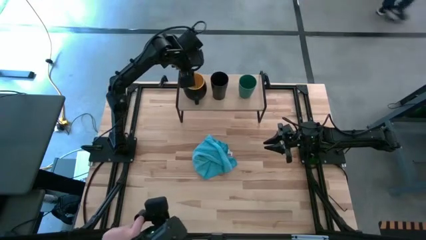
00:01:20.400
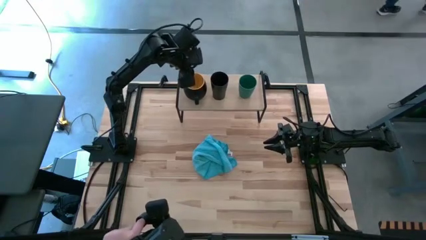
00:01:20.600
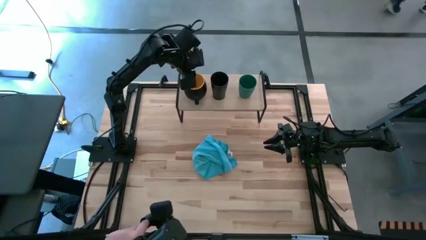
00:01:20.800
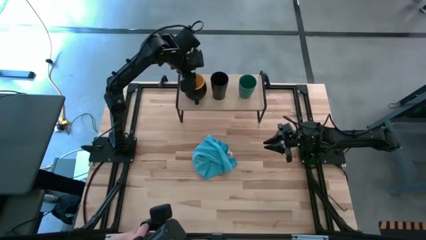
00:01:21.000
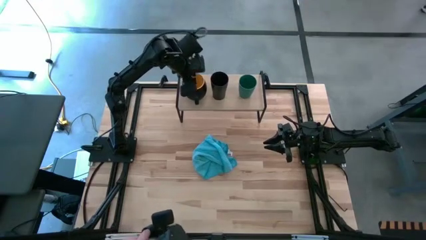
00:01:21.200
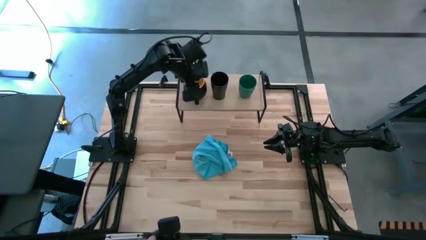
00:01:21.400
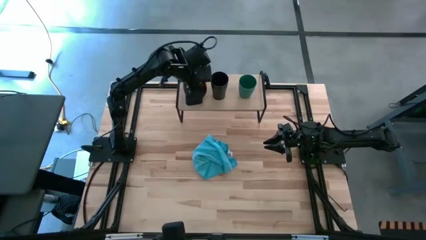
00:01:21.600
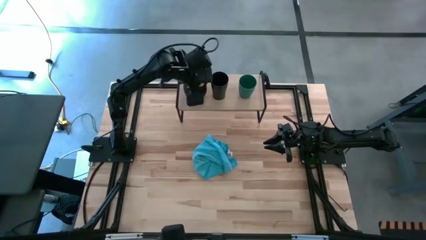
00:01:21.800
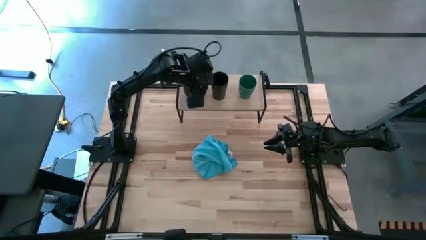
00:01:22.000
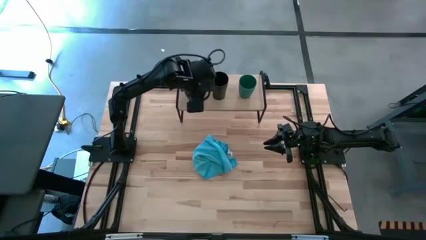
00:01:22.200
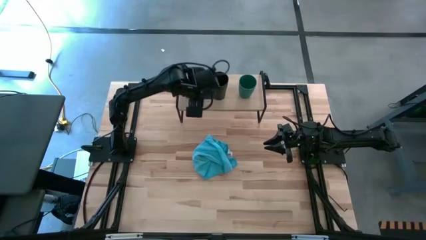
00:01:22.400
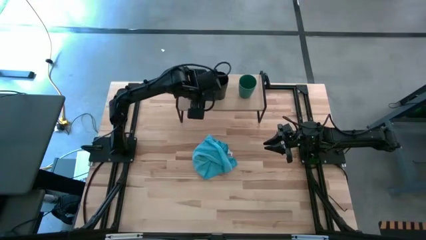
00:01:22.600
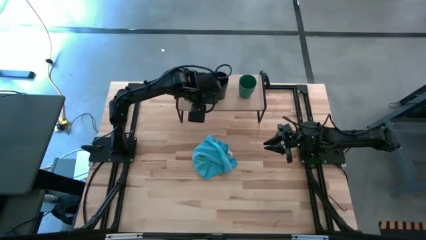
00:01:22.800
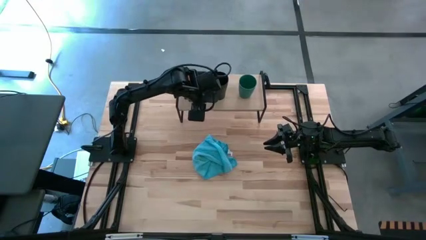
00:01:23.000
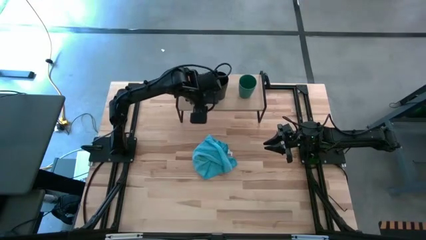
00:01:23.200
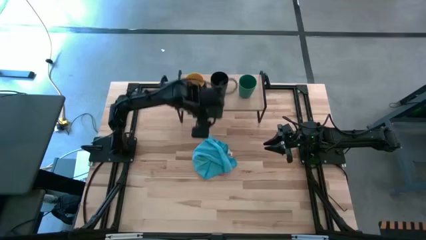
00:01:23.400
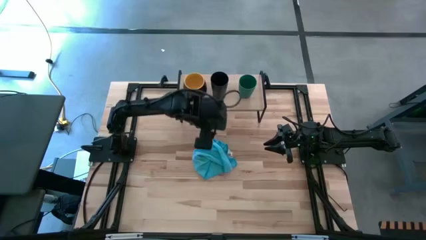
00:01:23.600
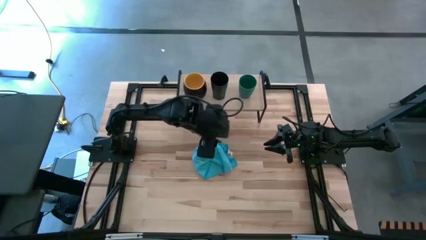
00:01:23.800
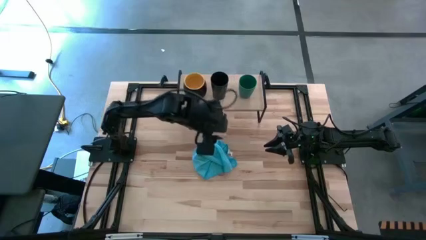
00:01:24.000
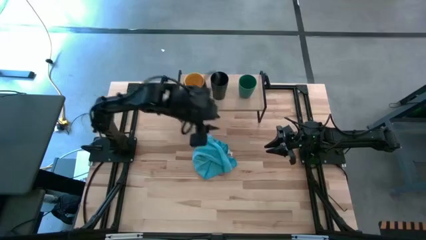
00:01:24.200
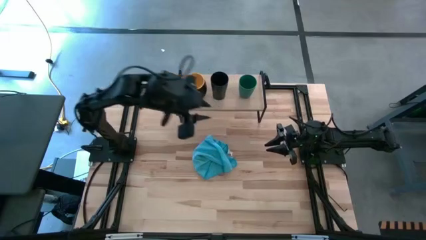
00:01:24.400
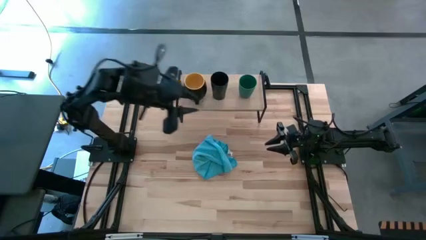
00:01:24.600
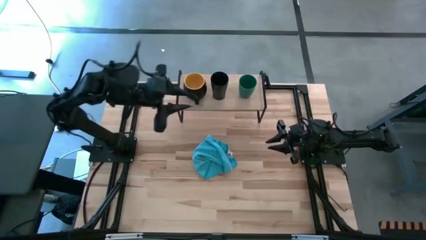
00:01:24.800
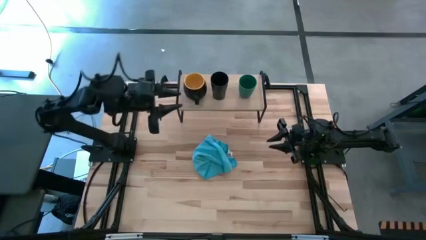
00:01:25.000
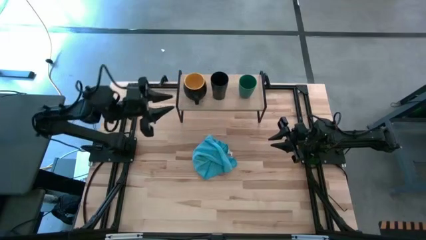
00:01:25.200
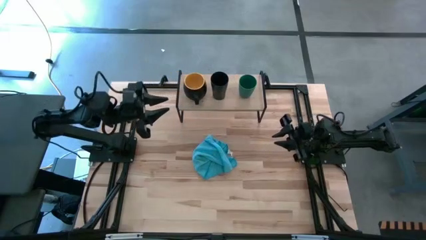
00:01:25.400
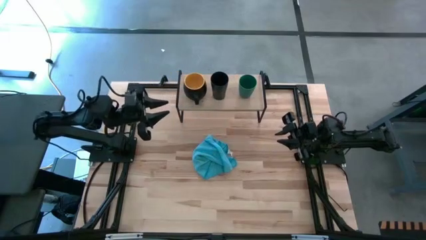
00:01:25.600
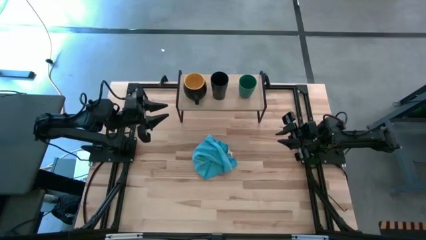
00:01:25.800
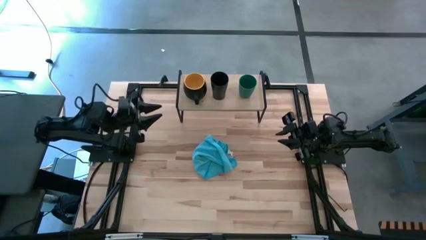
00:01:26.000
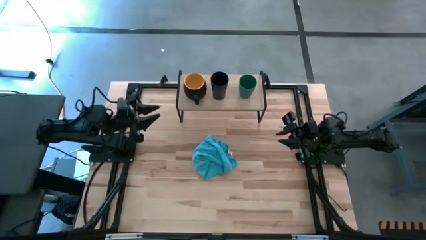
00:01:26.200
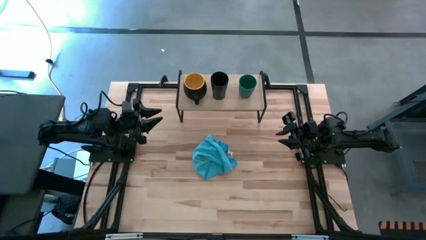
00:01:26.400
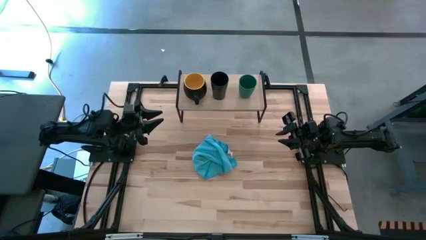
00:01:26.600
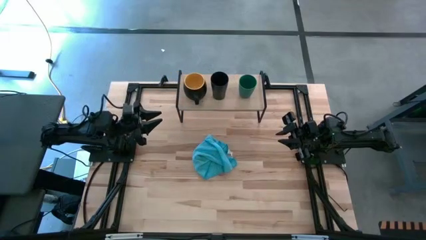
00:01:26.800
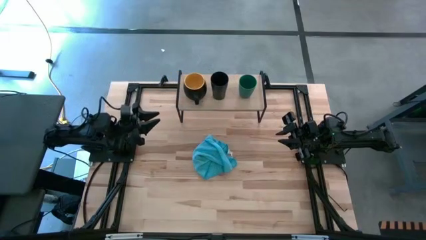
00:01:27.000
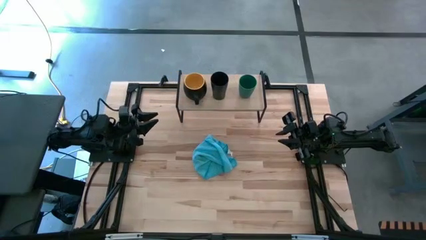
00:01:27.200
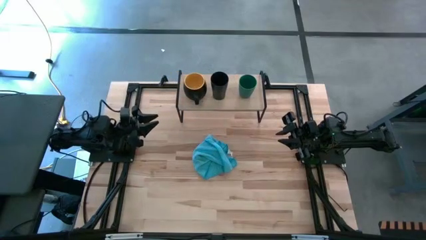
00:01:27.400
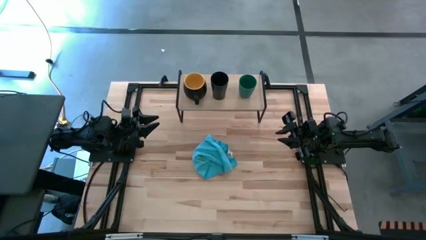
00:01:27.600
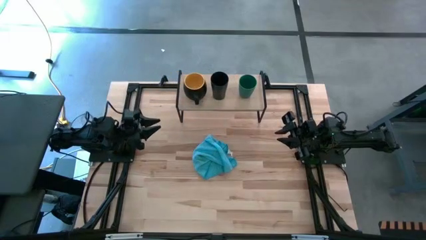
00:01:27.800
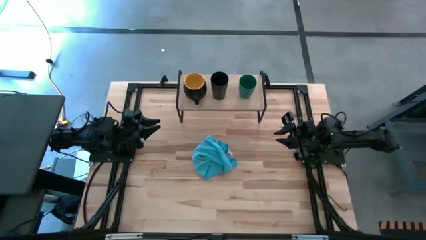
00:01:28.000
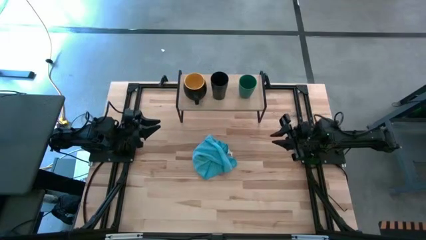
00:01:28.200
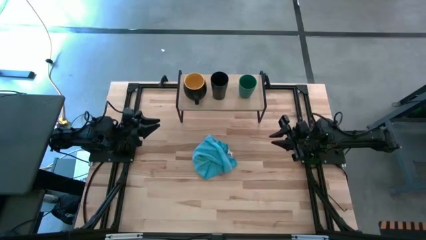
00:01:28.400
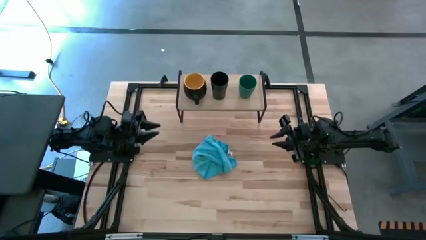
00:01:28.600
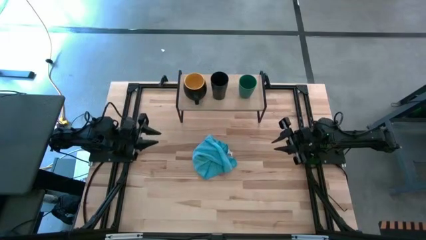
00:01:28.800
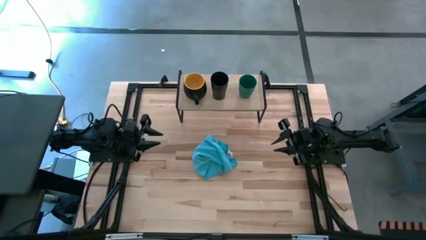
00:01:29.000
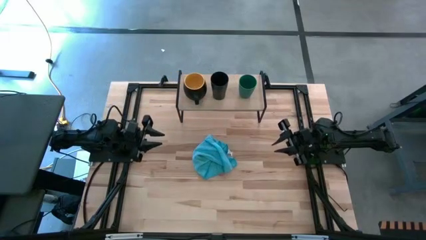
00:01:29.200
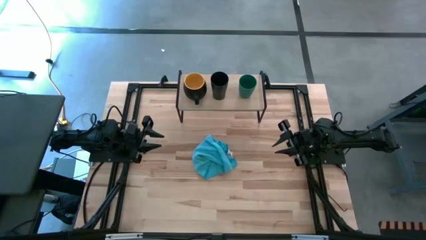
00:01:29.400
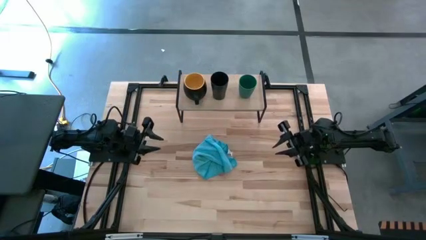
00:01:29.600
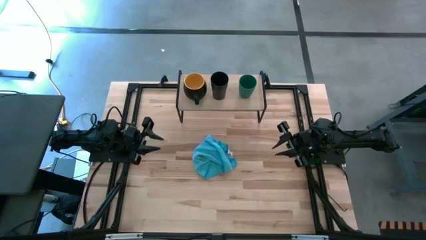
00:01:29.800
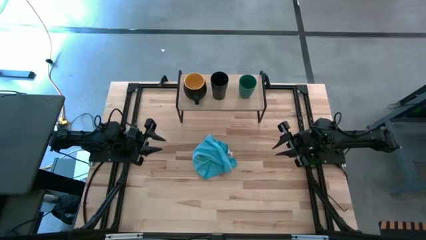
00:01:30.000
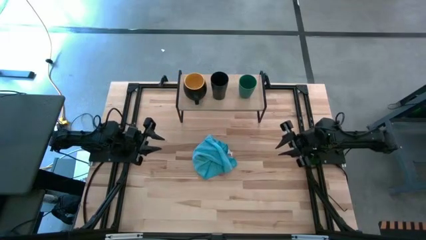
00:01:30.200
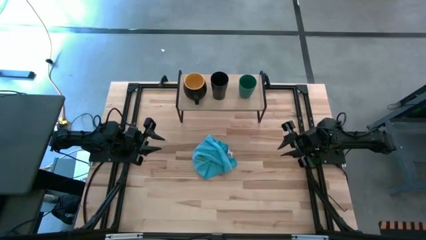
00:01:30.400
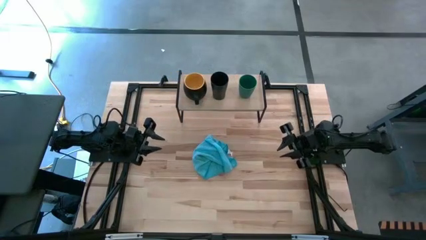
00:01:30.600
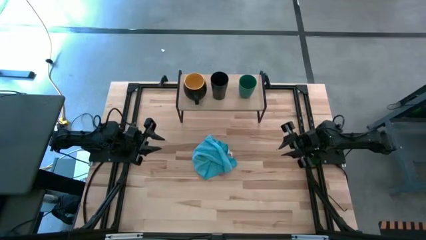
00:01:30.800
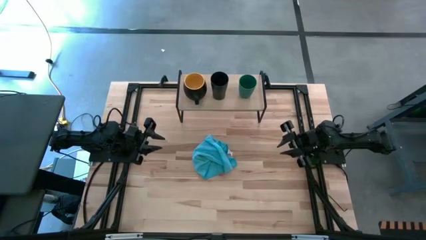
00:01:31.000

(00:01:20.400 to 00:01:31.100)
Task: Stack small to large cups/mugs on shelf
Return to Home Position

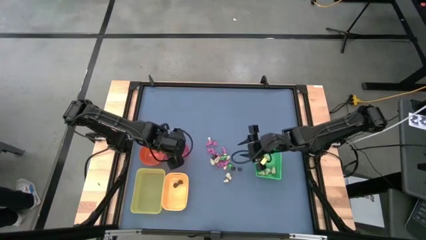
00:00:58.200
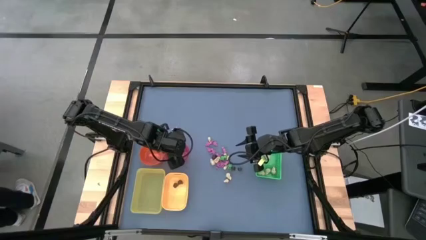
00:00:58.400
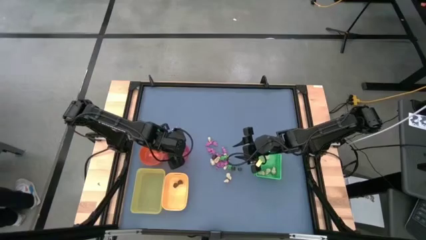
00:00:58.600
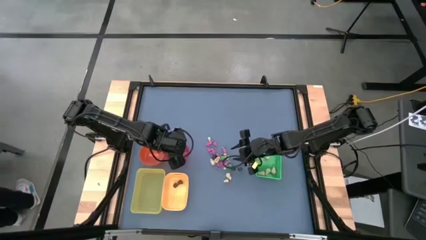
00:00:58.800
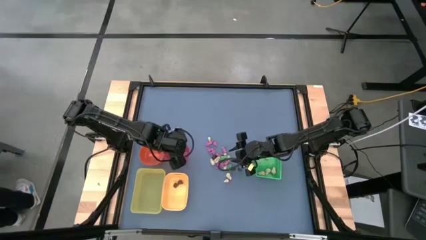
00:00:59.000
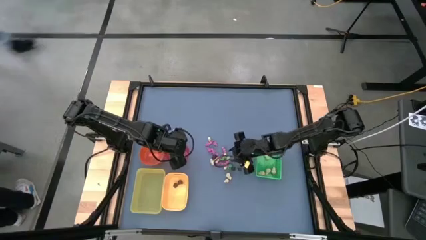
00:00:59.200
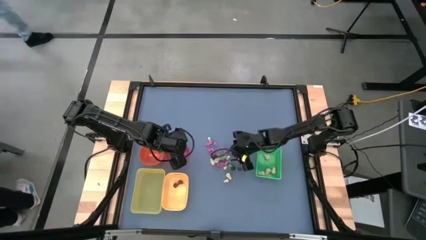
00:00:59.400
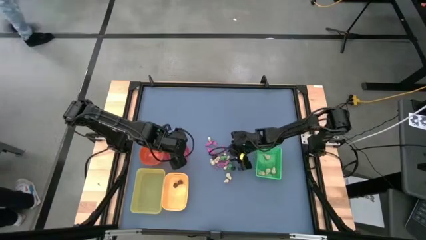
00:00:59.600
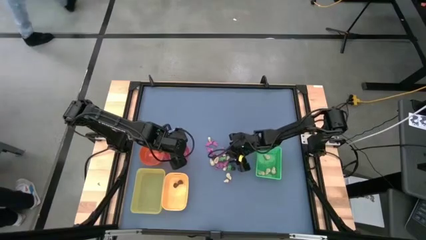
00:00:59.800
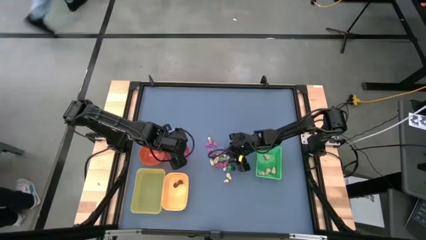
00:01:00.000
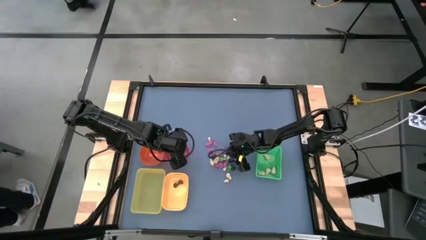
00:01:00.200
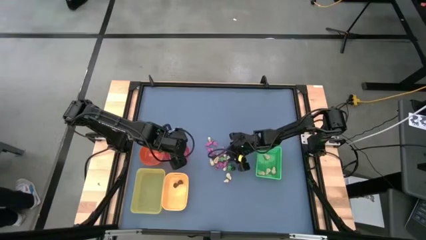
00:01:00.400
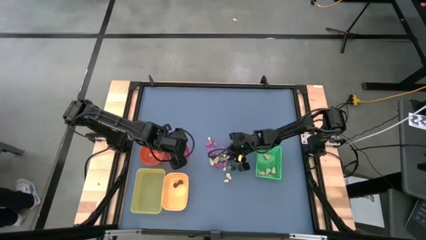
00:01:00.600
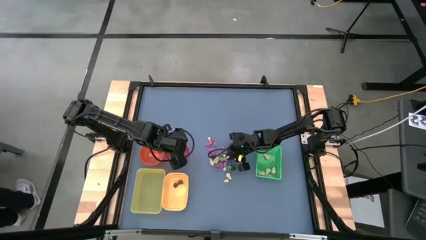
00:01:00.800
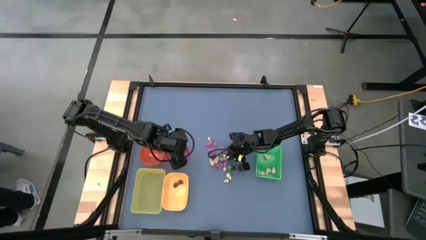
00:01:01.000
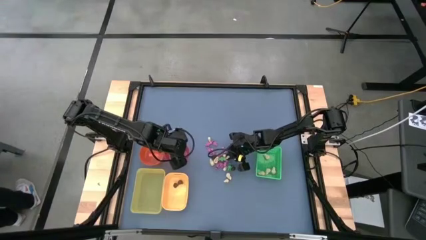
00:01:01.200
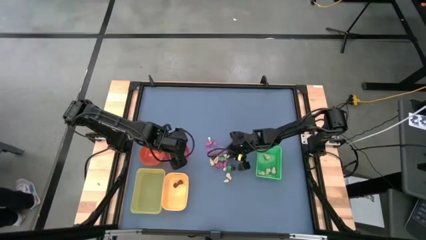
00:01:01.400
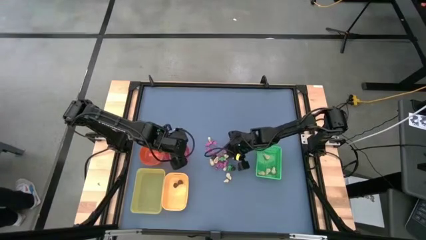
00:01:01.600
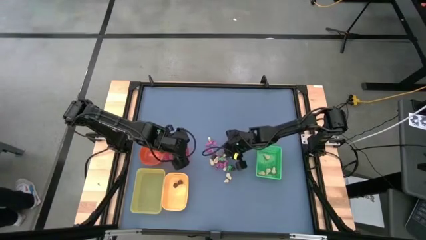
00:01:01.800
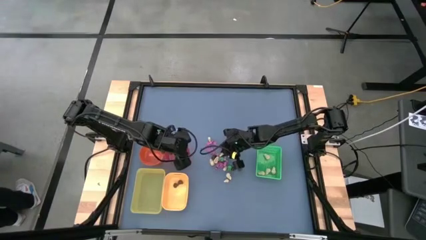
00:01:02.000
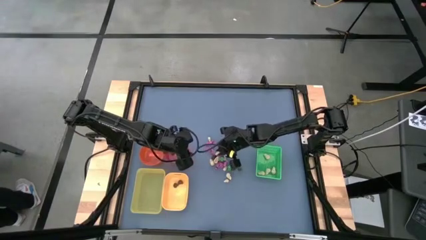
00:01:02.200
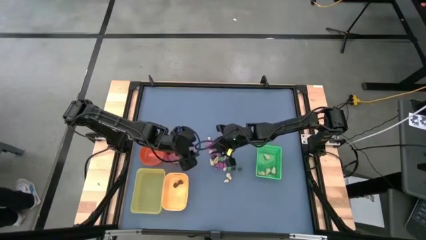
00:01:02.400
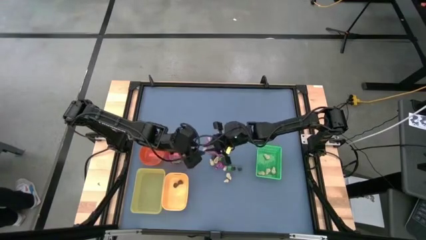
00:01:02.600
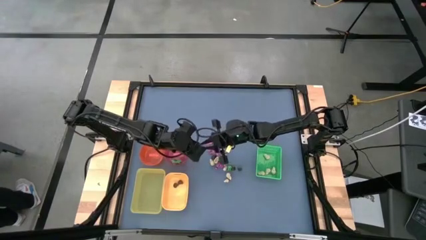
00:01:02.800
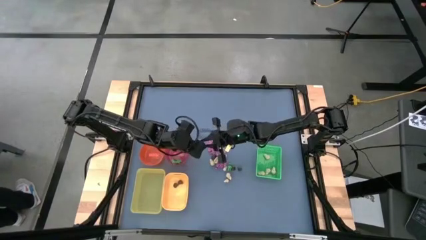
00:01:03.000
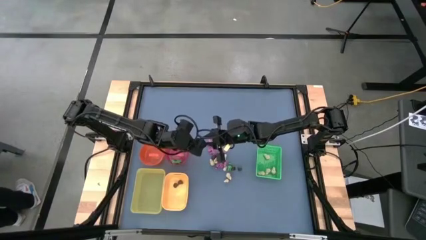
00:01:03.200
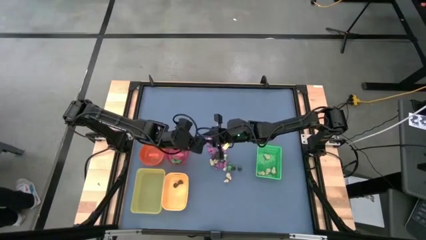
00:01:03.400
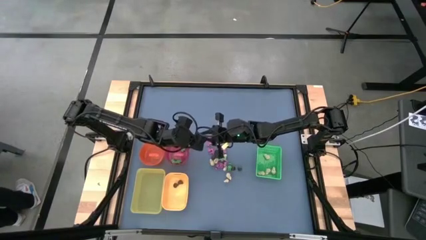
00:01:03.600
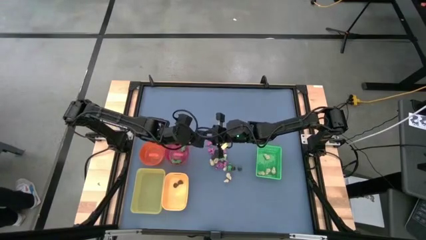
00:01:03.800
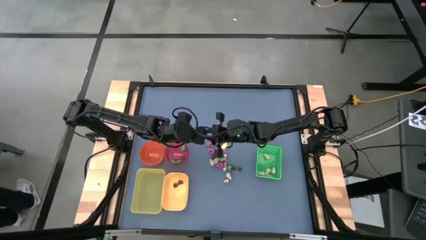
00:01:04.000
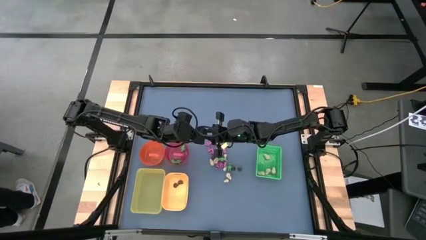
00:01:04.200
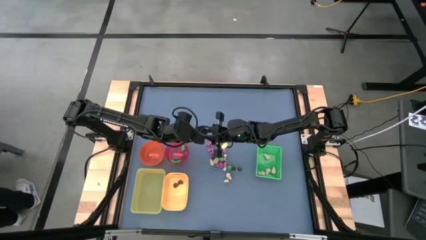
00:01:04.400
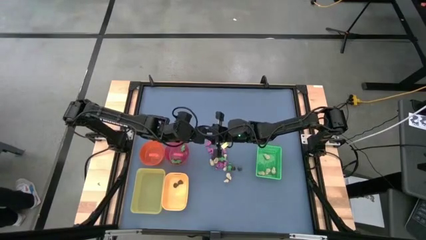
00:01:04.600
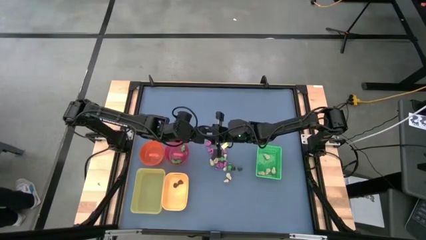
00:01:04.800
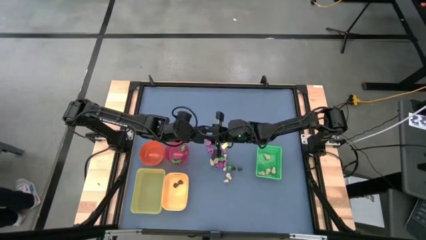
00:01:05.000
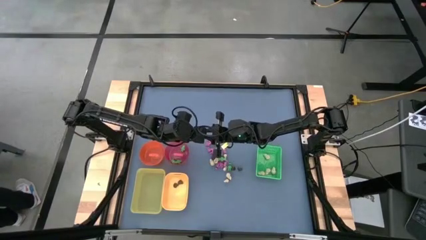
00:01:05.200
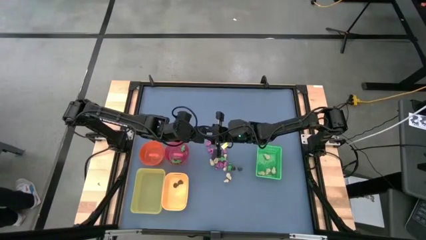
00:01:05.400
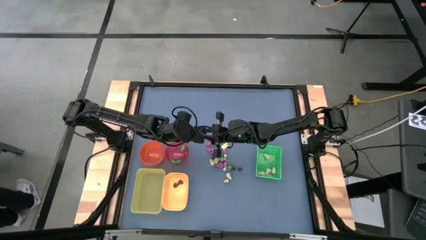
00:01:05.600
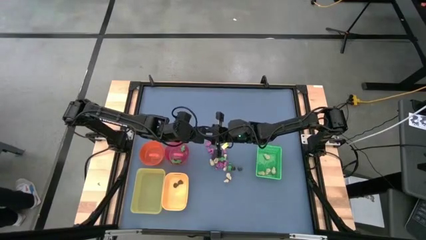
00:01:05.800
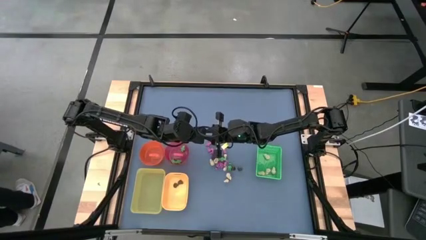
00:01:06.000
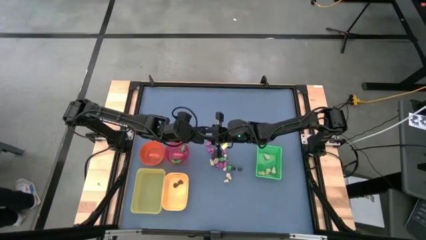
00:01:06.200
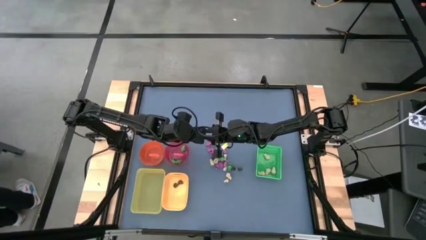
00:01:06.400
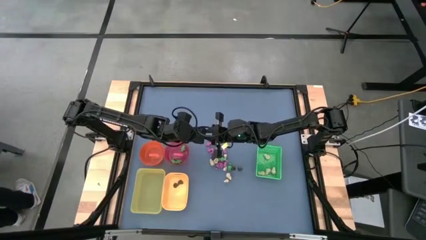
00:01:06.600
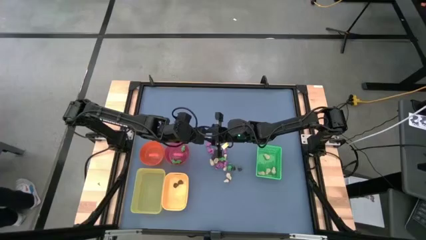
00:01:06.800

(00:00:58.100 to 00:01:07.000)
Task: Sort Halloween decoration
Put the white skull toy into the orange bowl
